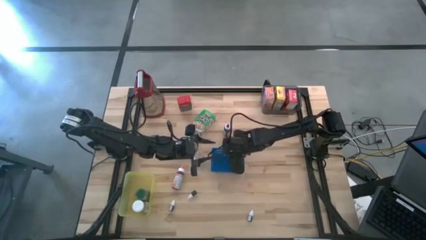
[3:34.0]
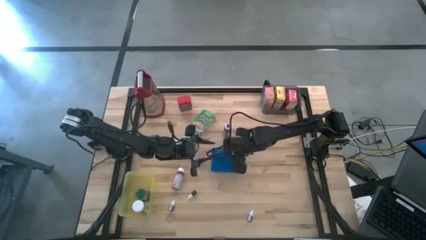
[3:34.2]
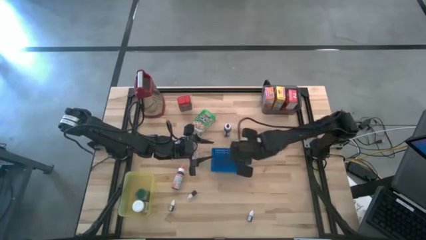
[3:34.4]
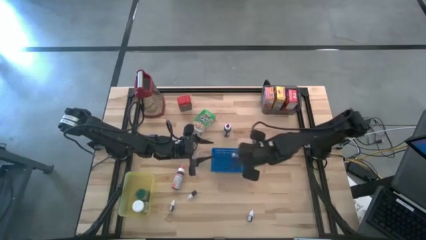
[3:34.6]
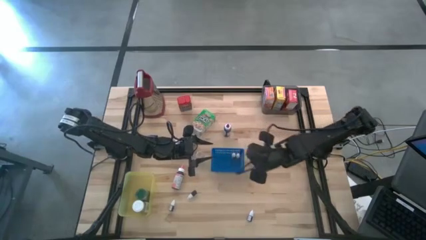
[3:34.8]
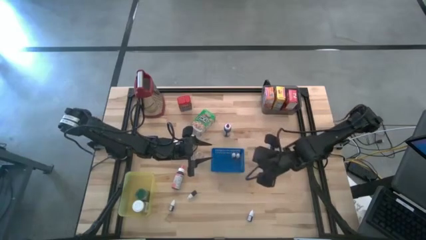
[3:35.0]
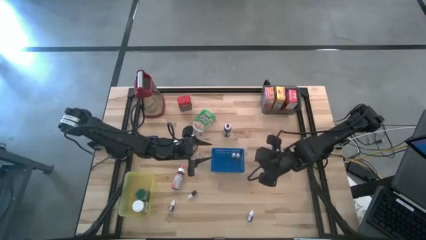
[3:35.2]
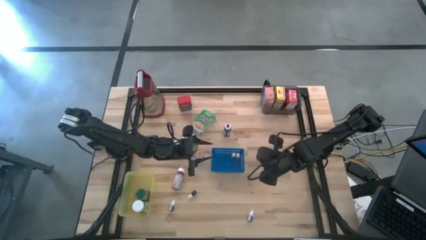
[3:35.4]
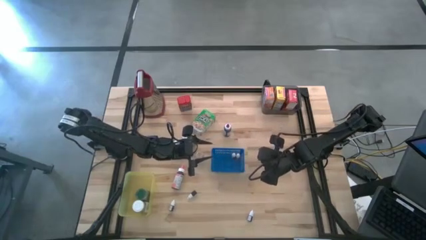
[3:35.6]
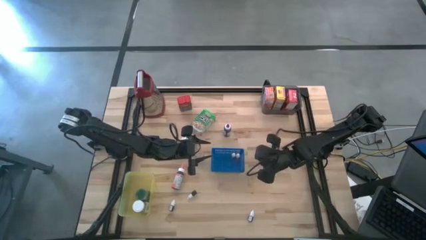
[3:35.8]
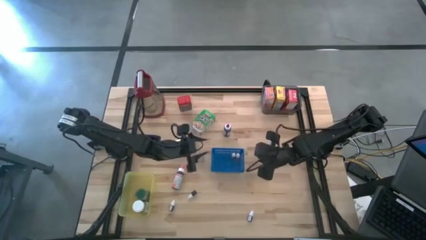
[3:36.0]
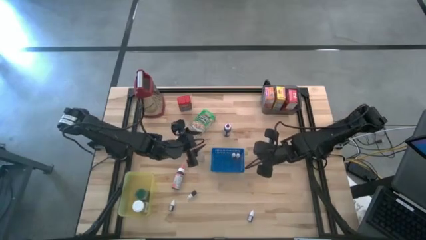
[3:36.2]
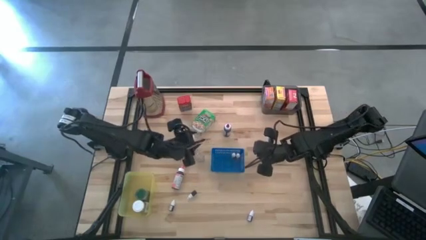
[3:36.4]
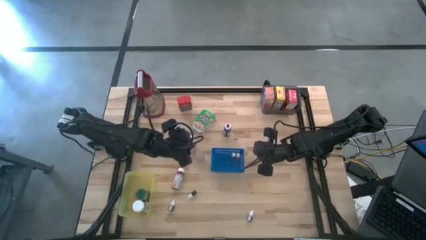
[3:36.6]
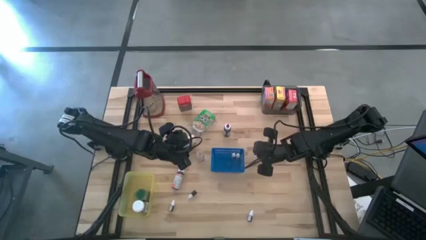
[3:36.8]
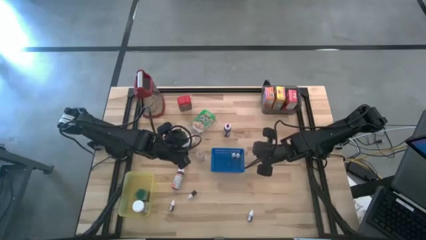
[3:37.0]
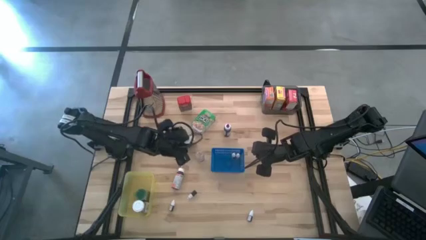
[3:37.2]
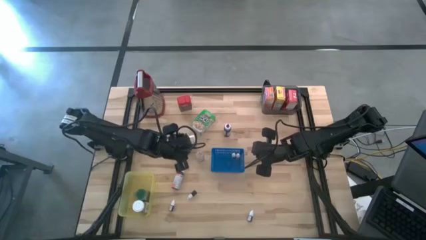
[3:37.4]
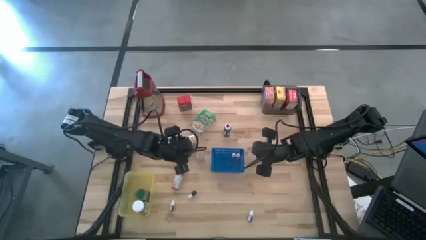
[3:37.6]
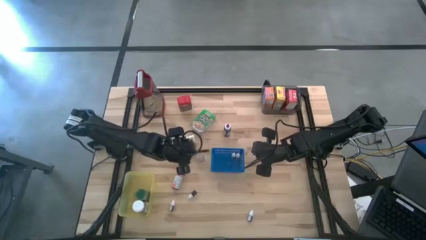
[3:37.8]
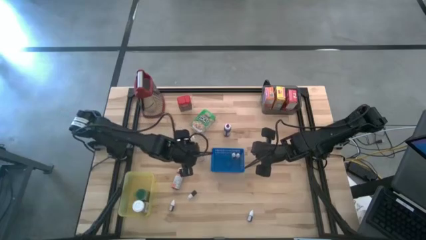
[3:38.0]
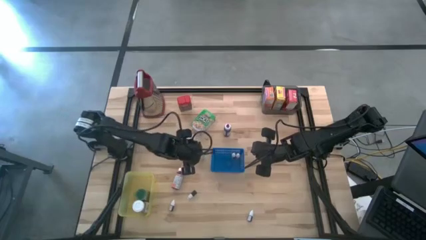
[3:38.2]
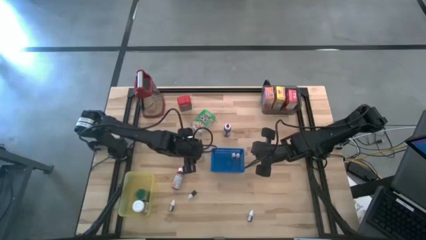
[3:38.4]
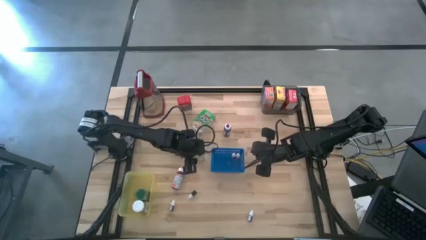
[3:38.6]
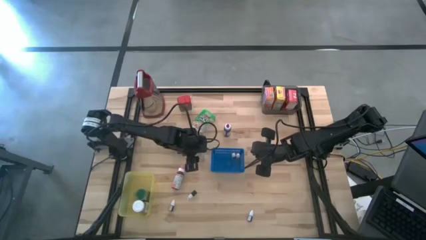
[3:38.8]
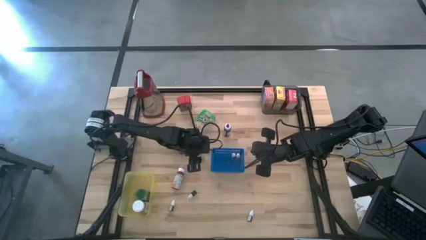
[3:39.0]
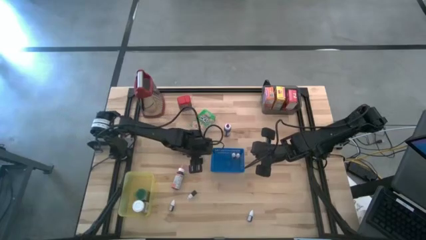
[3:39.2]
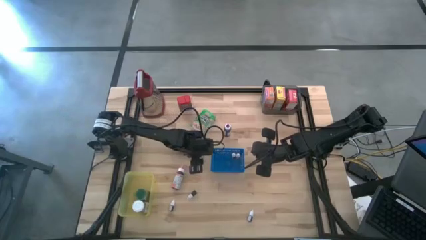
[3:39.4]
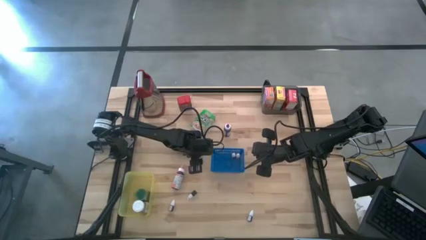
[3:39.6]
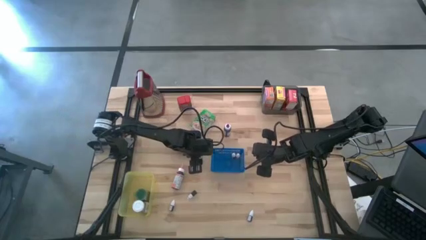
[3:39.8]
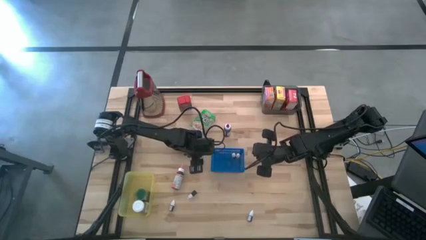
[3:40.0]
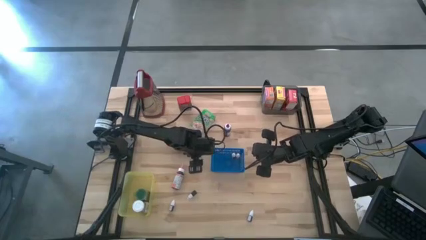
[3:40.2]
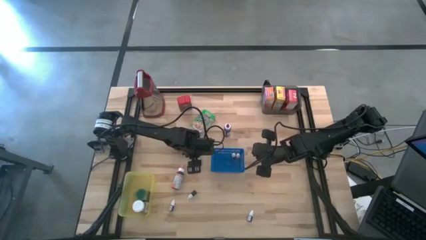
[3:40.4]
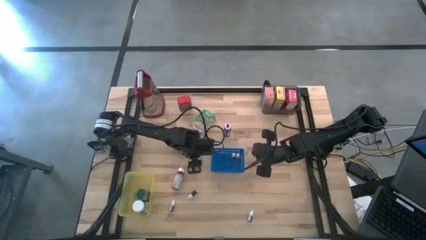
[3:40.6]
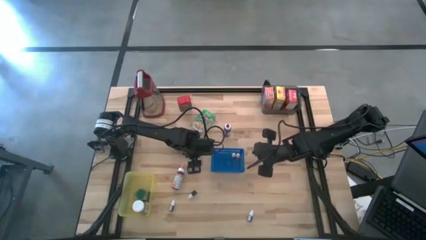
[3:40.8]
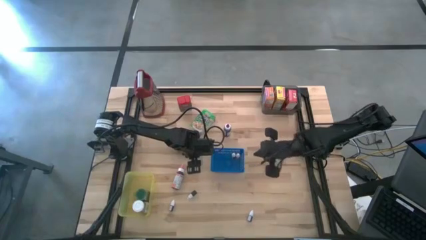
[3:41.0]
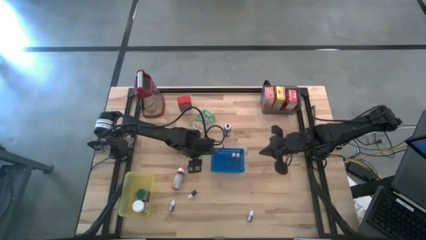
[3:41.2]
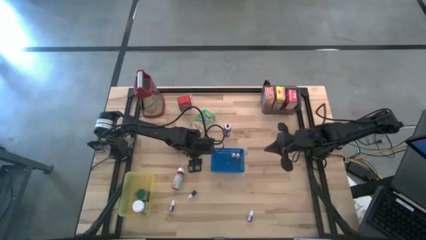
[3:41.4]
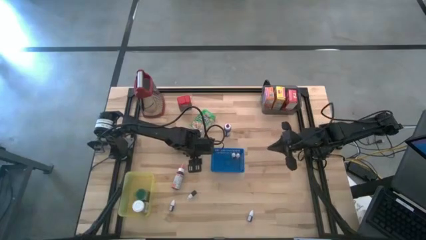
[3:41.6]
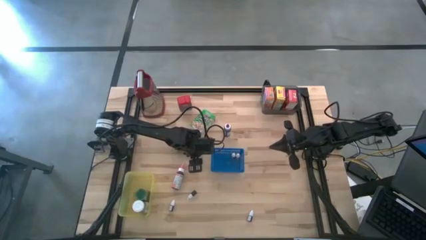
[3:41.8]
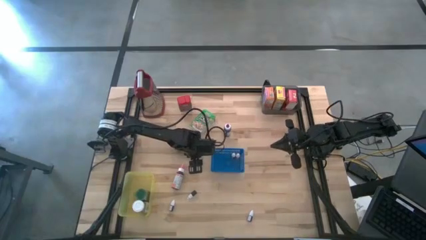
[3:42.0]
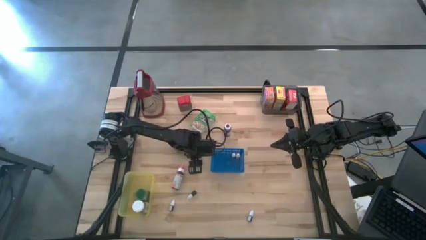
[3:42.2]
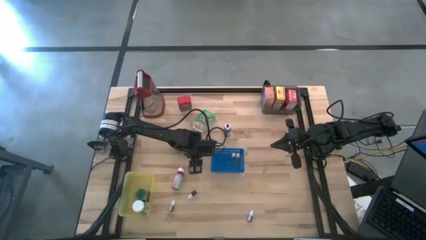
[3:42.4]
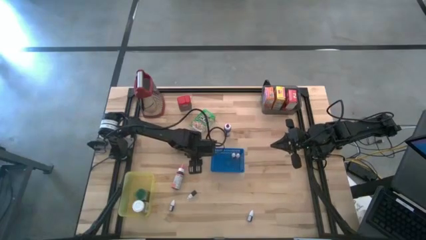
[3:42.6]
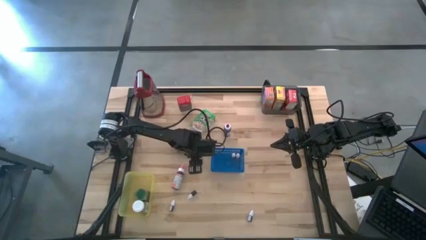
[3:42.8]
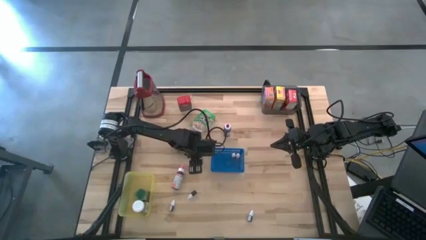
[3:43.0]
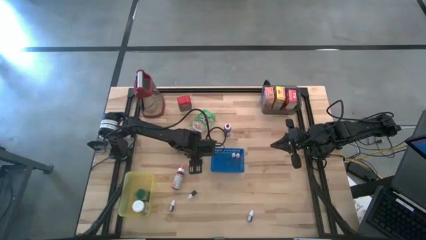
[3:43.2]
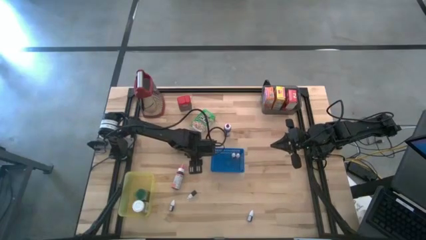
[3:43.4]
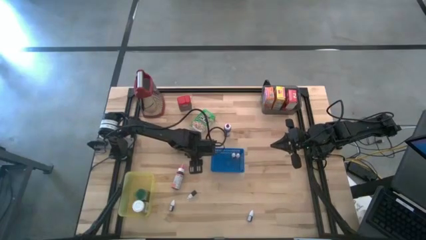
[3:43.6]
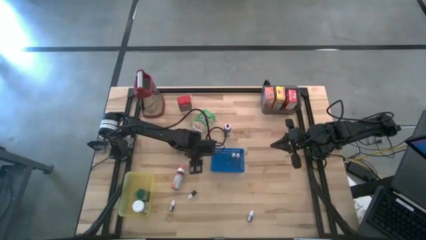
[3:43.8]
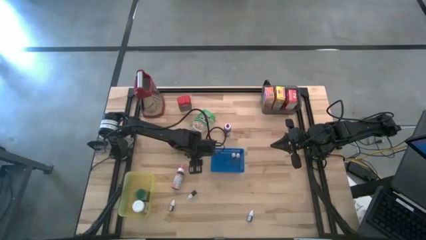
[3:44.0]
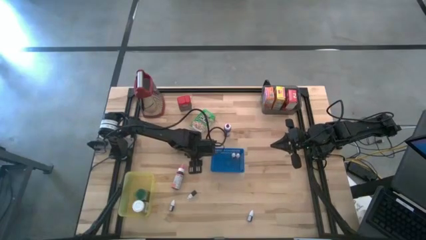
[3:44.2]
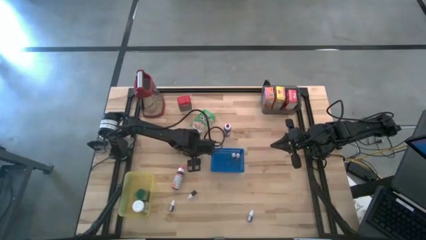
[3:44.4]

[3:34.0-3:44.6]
Task: Pick & Place Kitchen Items
Put the brown seasoning bottle into the yellow bin

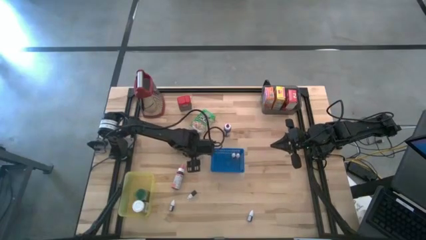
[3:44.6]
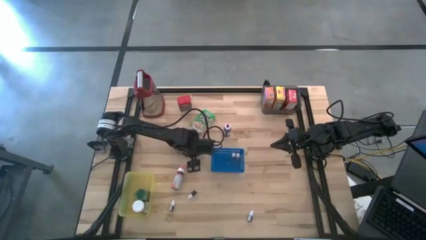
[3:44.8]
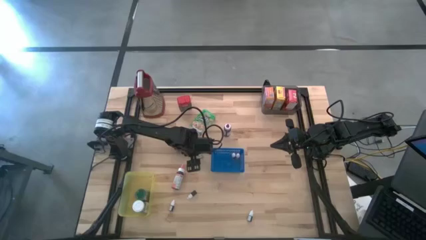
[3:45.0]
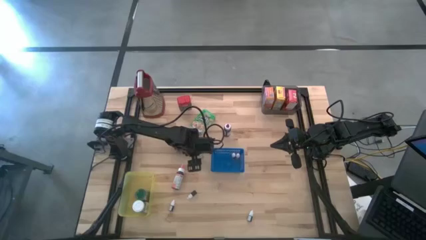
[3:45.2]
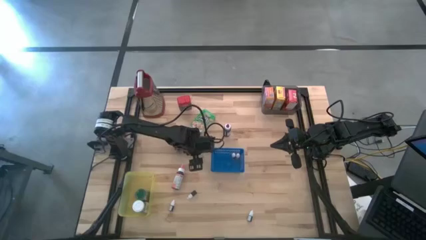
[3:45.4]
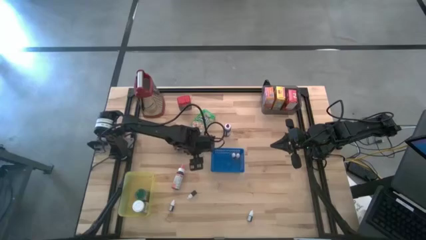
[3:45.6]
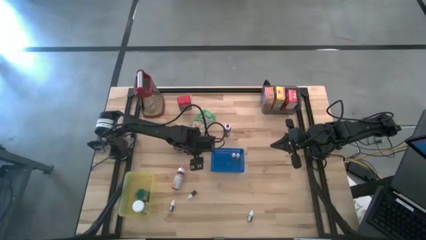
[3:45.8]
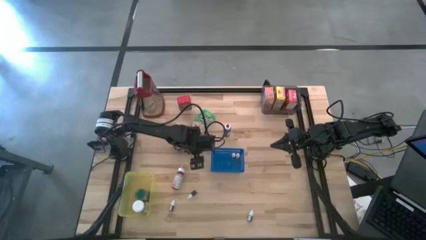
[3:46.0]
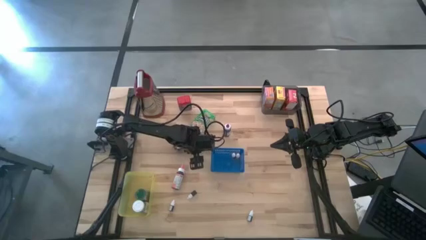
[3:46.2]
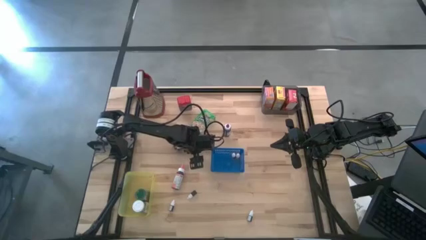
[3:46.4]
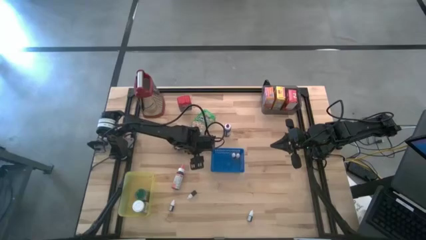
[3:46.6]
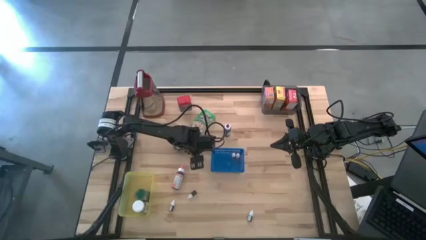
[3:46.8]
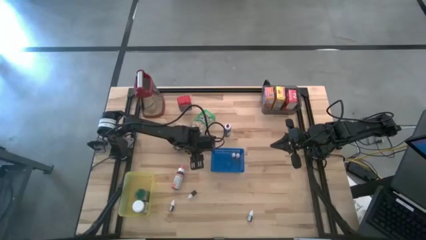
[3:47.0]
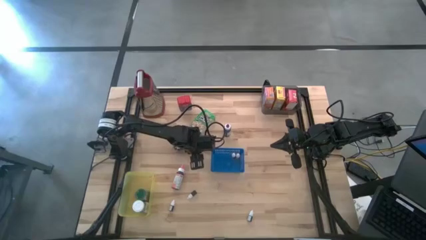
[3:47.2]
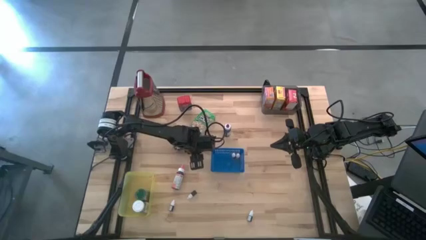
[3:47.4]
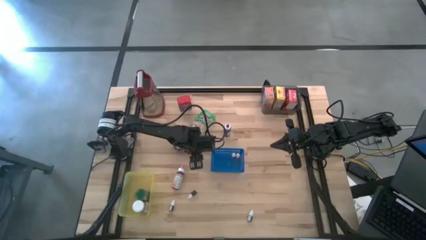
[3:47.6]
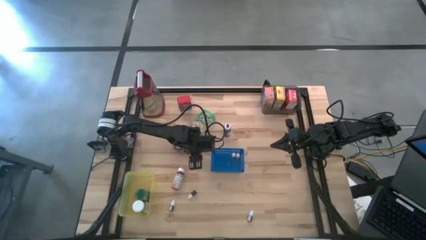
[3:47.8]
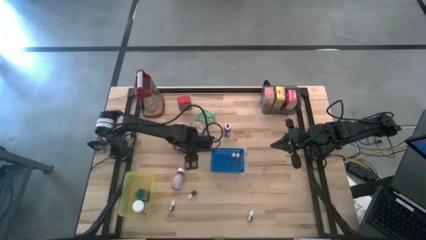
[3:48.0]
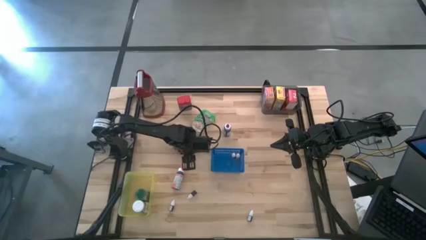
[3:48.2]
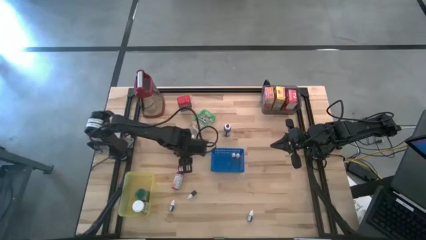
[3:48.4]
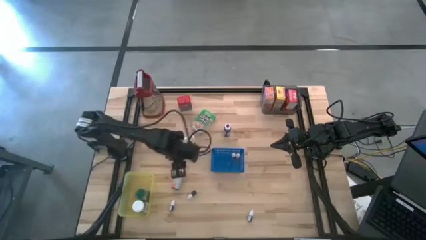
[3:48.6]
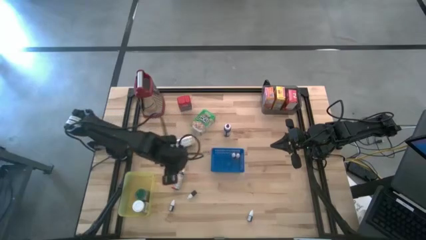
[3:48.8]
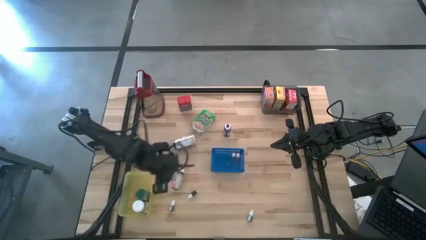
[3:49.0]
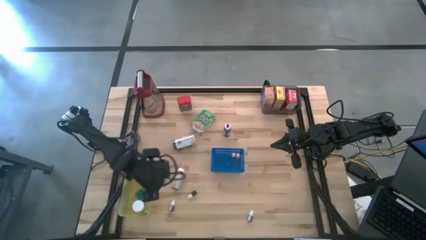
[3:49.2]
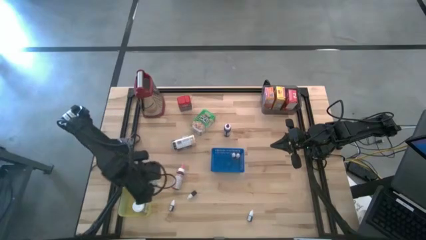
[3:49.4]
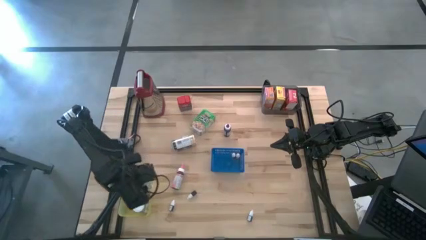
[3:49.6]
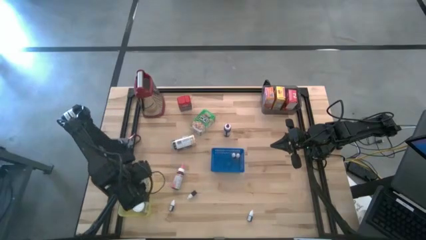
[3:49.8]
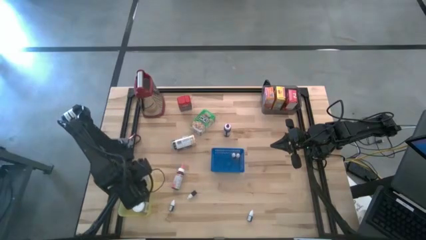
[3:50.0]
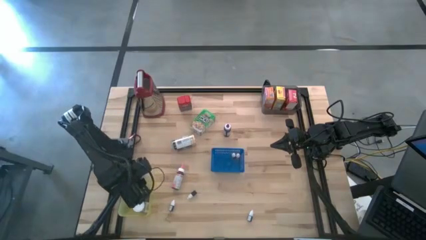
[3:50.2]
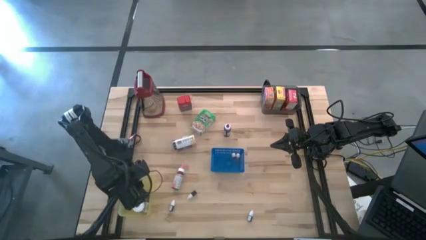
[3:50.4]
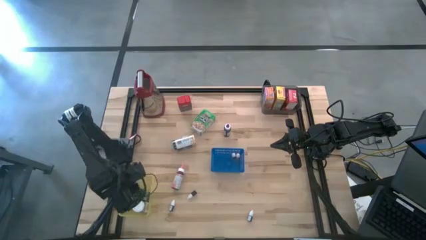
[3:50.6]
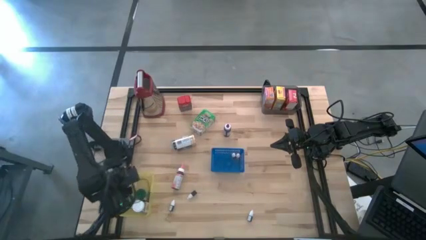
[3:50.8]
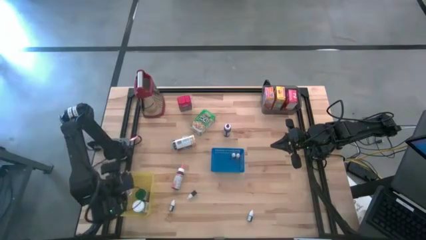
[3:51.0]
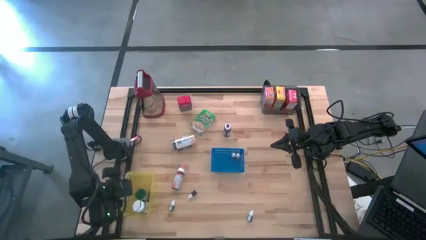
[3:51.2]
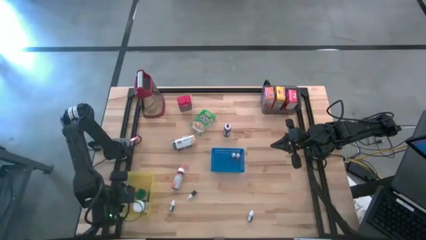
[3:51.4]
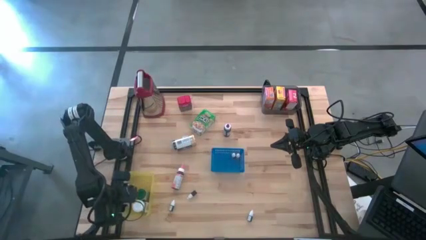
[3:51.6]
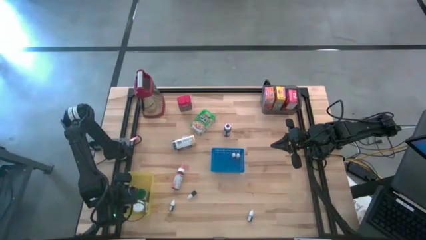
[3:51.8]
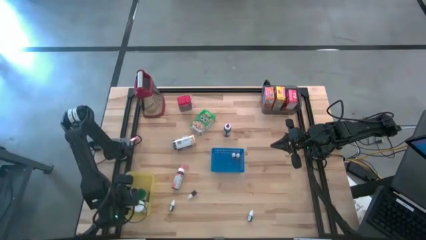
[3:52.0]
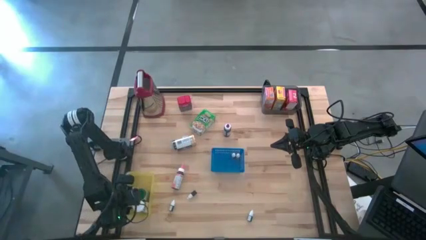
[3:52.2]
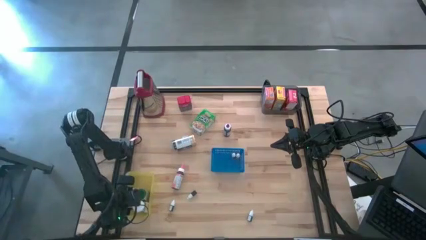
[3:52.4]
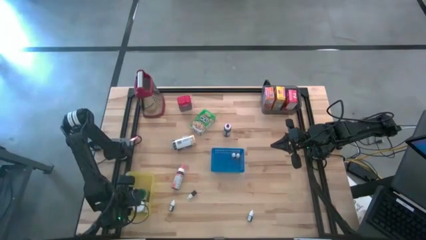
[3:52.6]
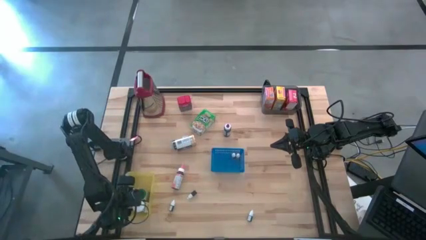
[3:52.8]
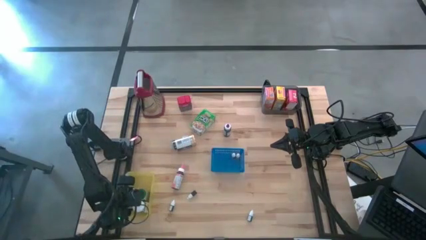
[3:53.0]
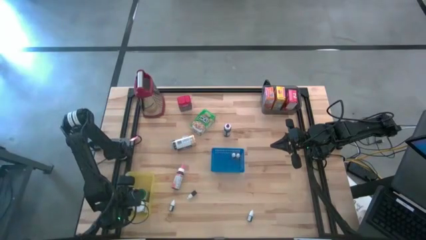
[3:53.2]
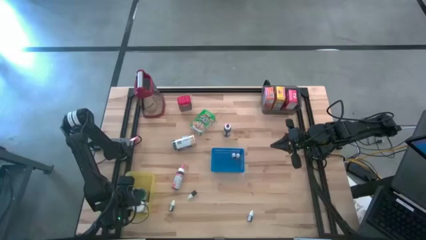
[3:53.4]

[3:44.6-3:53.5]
Put the brown seasoning bottle into the yellow bin
